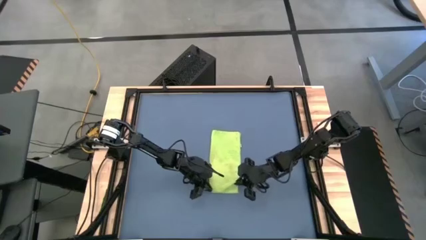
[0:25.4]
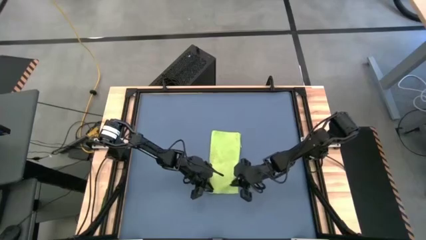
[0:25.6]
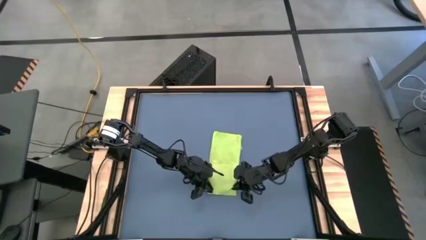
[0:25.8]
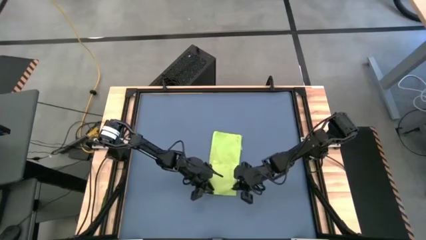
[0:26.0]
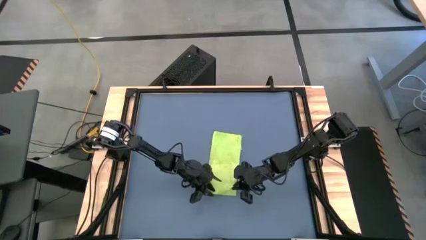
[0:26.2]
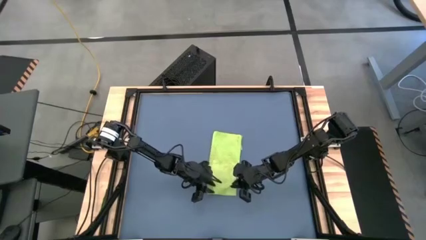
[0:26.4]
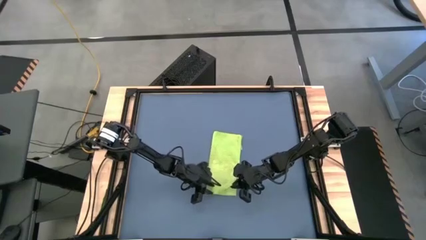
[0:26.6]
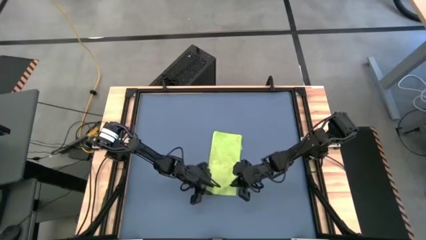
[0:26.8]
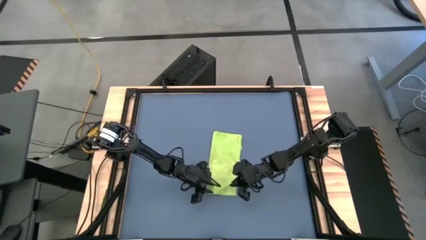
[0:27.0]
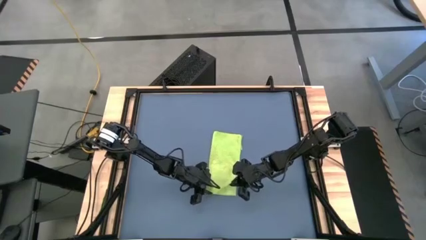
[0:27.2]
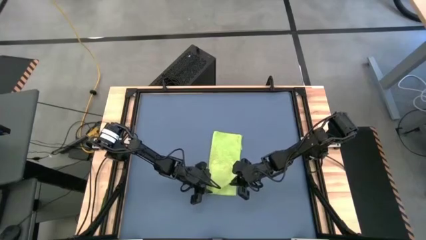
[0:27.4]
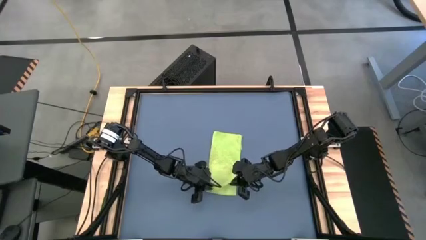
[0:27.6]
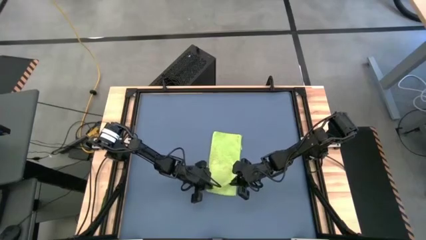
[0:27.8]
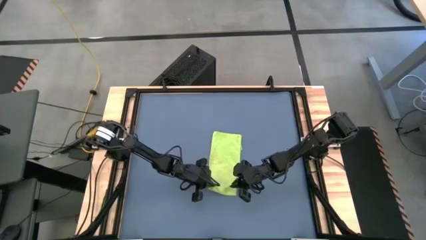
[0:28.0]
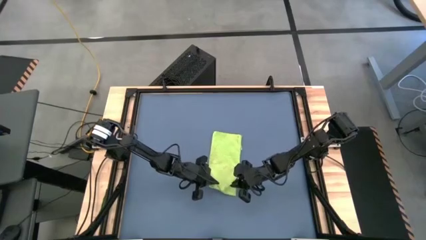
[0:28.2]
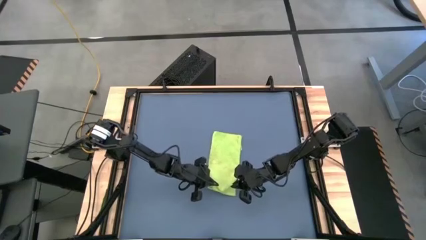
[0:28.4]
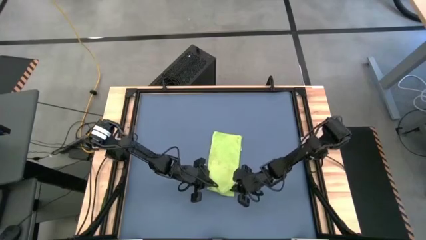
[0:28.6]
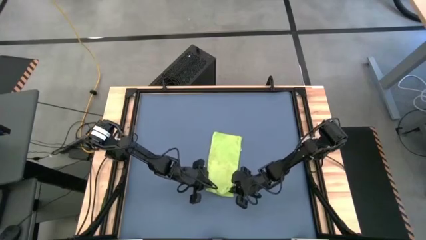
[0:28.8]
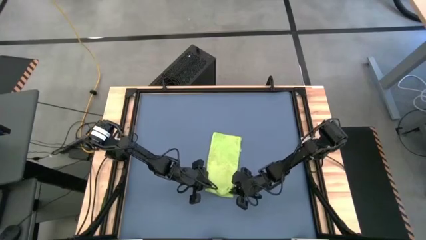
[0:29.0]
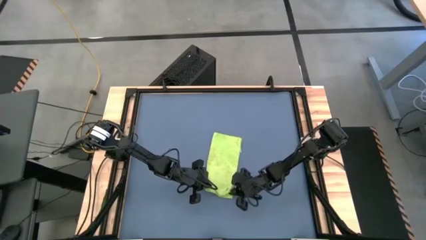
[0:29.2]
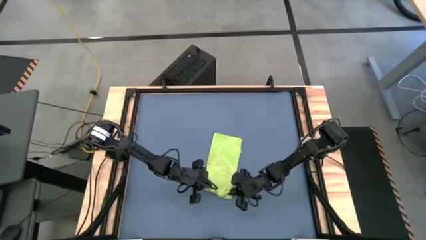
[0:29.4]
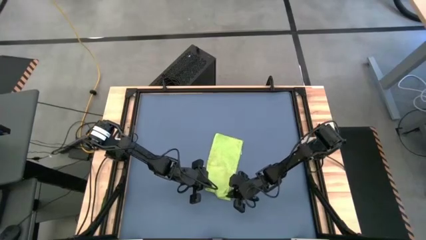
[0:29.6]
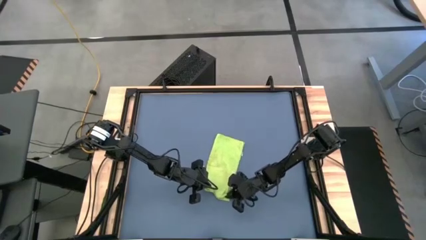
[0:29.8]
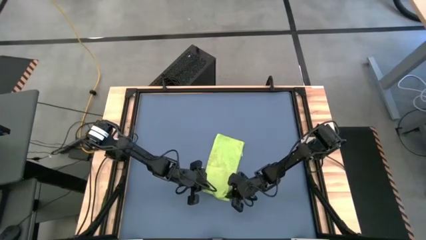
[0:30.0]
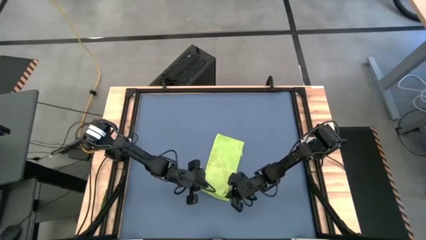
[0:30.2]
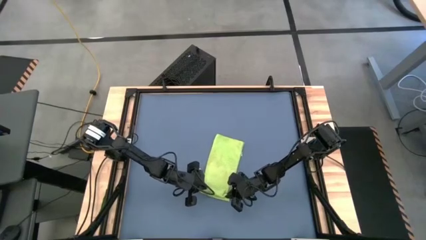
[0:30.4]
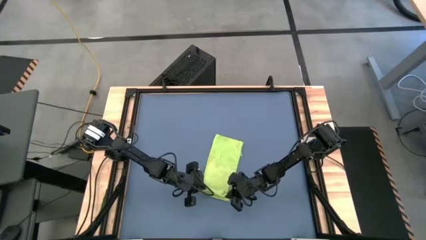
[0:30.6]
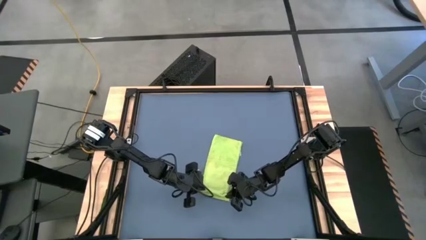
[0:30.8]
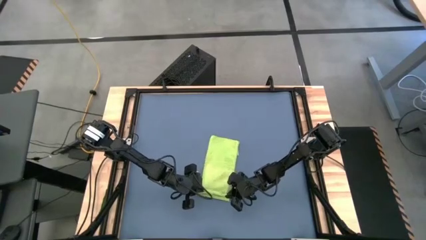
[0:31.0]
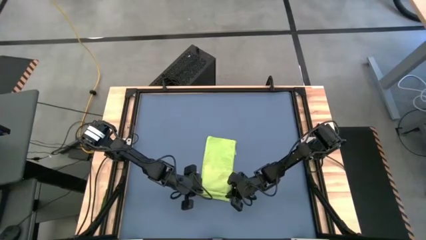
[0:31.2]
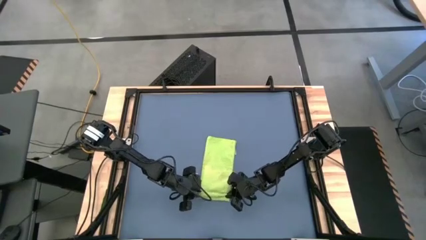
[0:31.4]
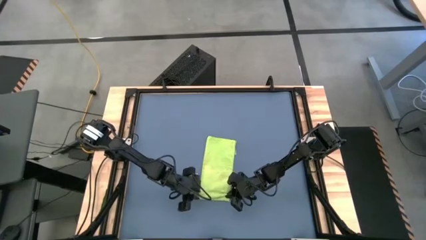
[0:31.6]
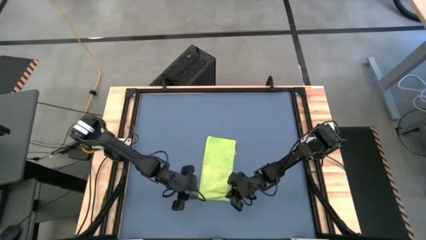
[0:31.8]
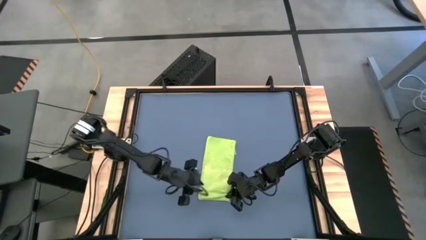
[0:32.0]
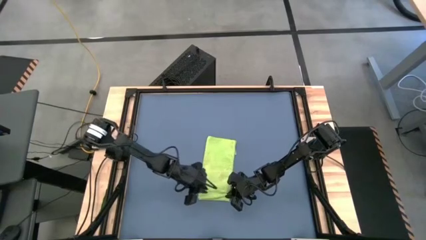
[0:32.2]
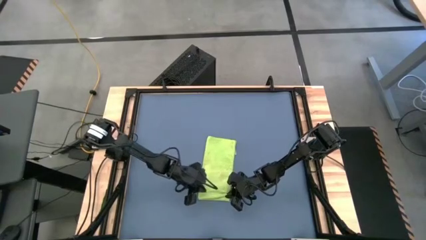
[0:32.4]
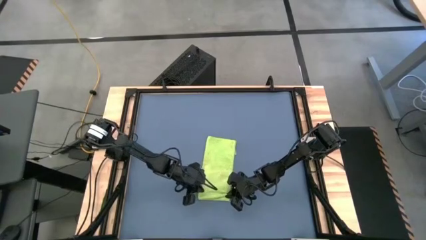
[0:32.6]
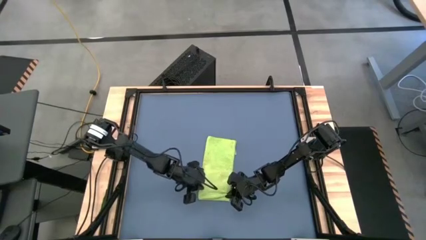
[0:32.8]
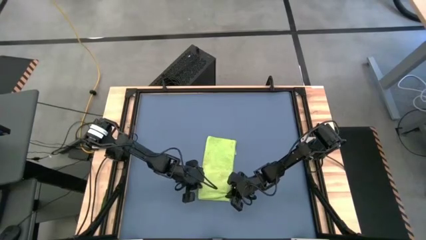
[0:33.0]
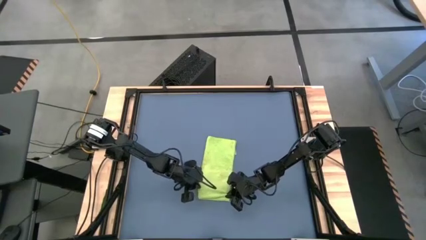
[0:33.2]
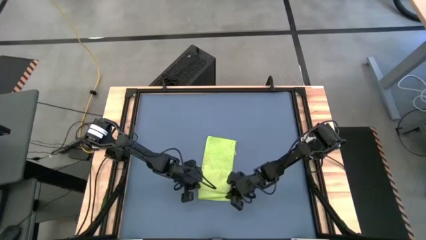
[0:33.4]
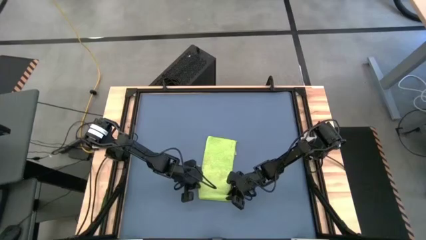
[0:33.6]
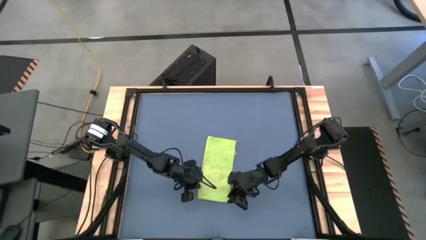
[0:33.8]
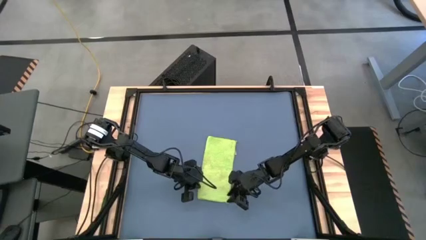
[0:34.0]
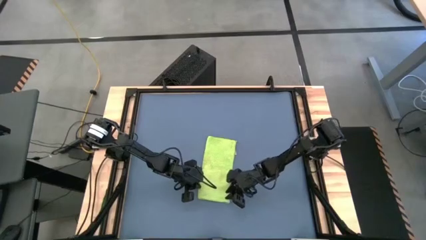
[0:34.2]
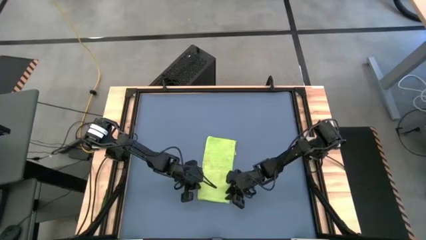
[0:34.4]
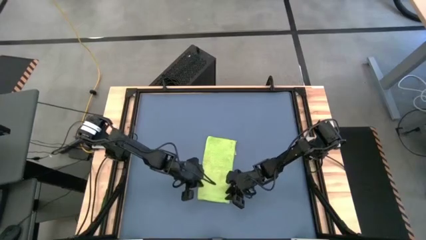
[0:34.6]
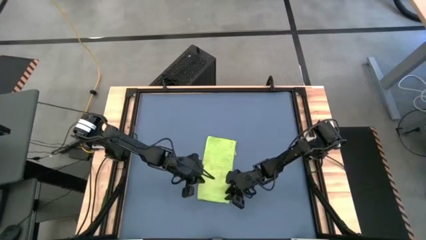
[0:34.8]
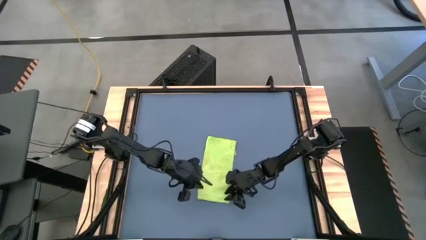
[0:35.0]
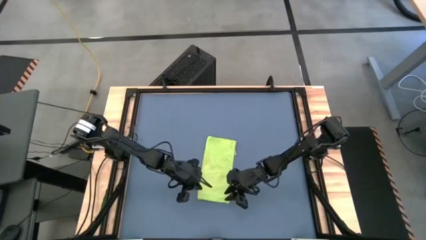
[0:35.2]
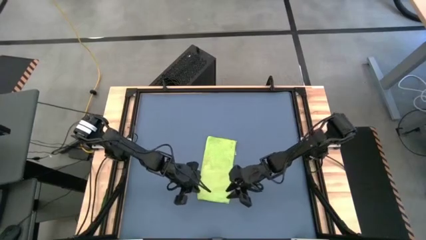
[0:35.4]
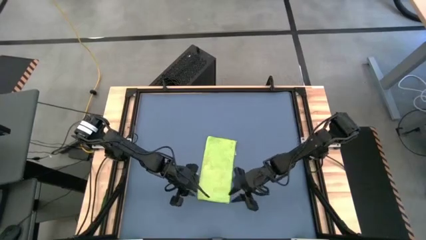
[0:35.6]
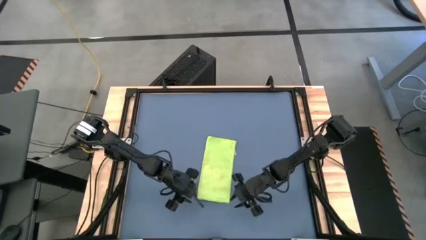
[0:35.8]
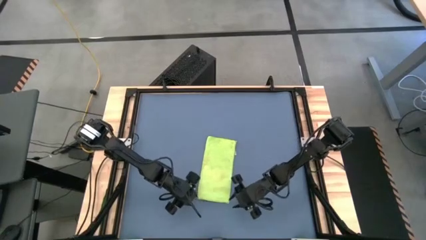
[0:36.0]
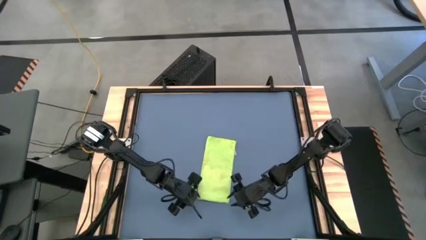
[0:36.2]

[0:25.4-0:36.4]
Task: Roll towel
Roll the green towel

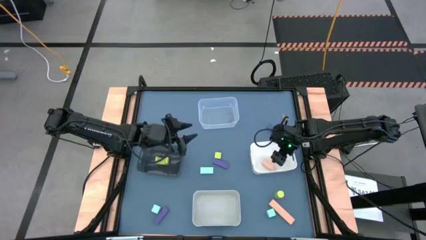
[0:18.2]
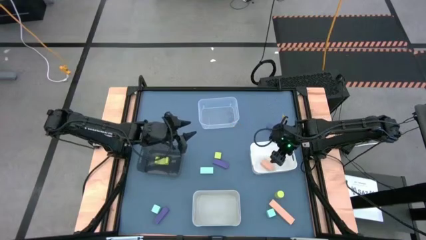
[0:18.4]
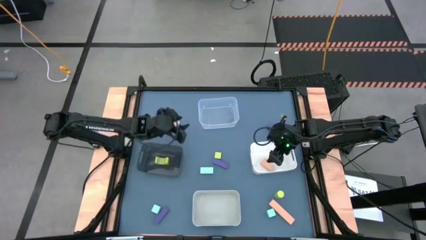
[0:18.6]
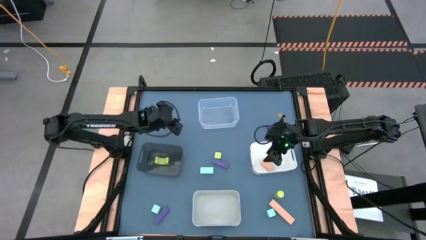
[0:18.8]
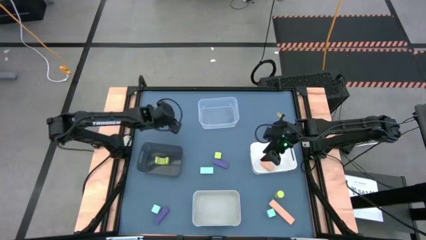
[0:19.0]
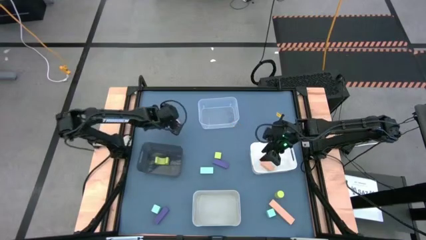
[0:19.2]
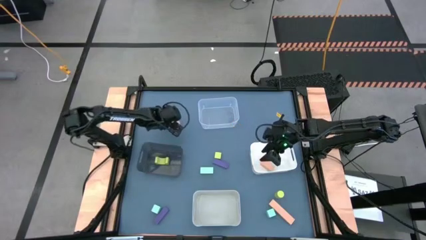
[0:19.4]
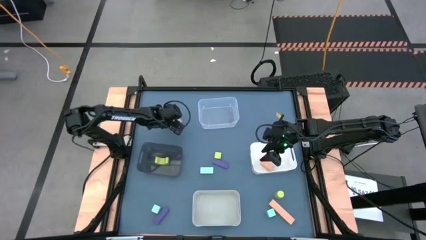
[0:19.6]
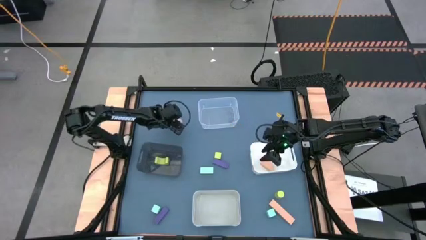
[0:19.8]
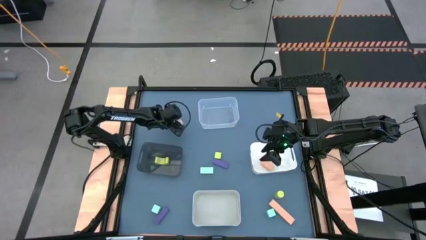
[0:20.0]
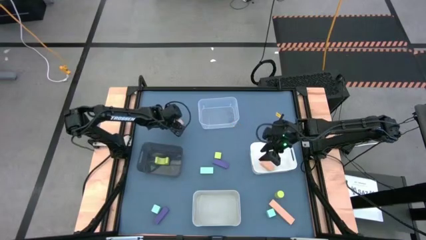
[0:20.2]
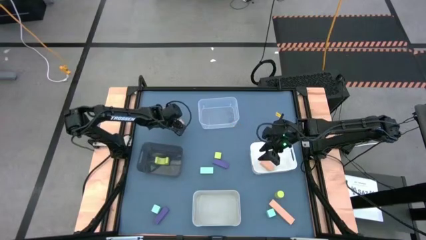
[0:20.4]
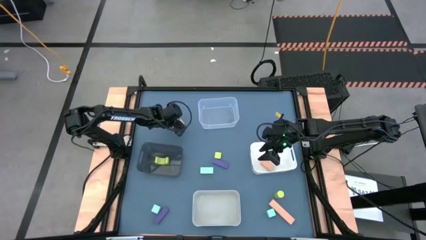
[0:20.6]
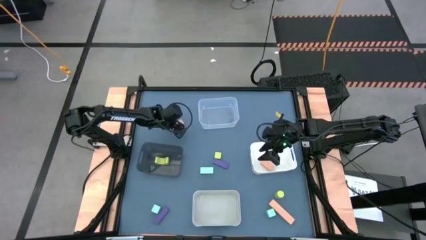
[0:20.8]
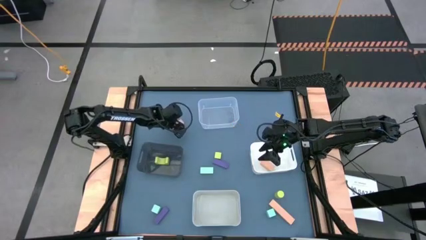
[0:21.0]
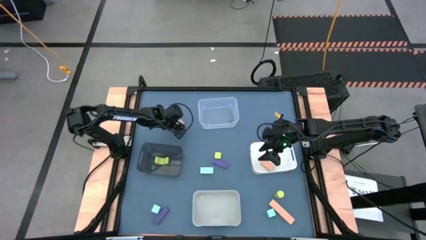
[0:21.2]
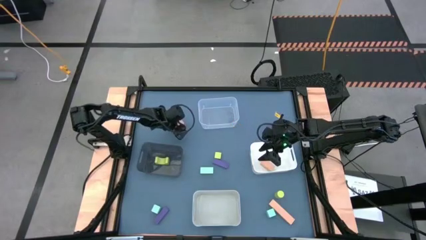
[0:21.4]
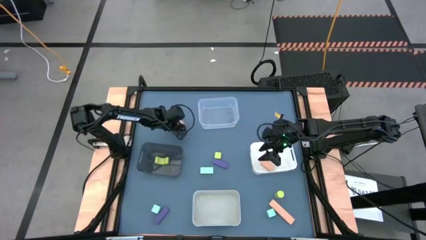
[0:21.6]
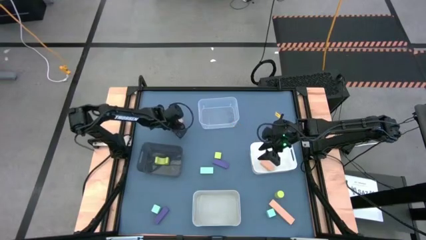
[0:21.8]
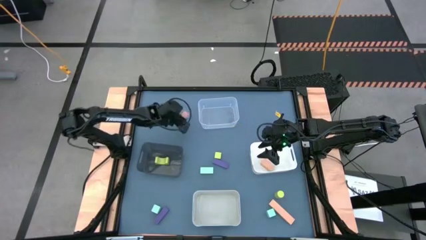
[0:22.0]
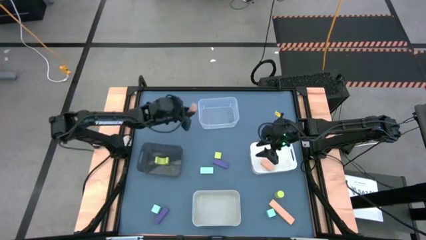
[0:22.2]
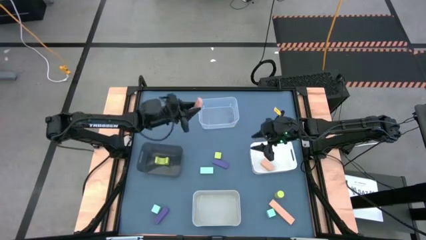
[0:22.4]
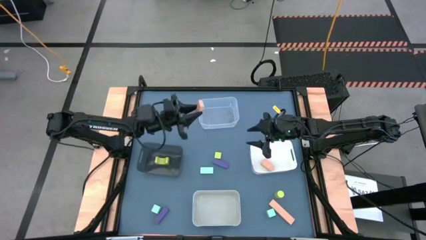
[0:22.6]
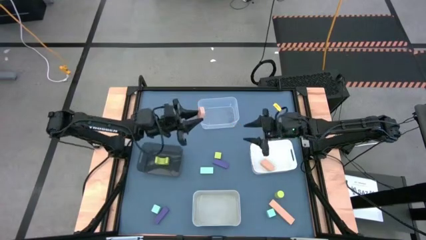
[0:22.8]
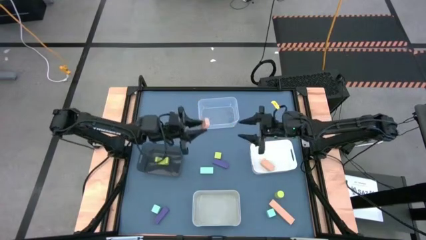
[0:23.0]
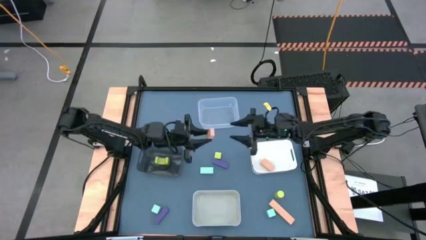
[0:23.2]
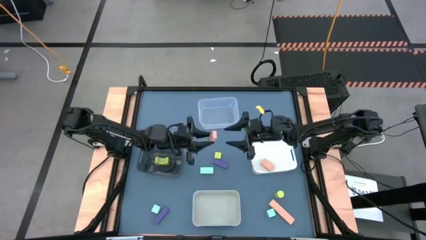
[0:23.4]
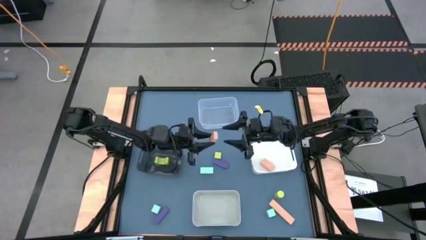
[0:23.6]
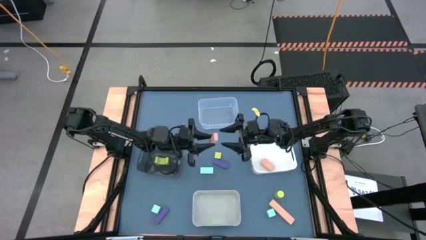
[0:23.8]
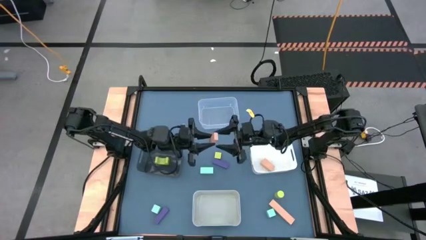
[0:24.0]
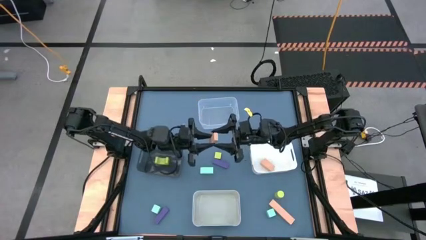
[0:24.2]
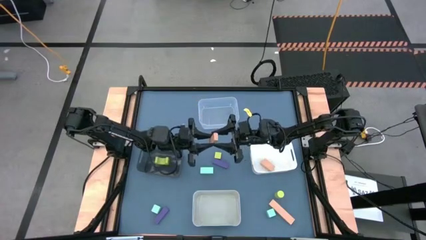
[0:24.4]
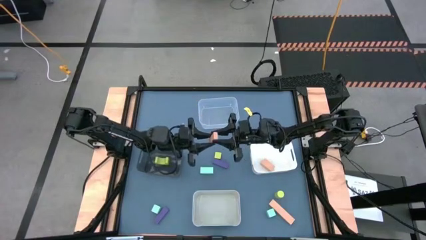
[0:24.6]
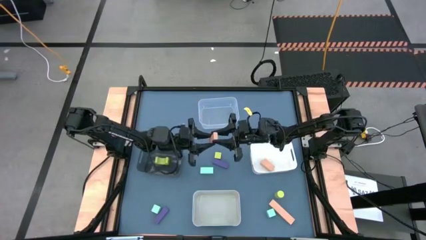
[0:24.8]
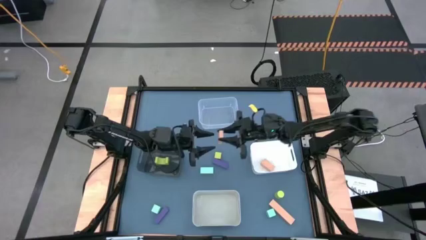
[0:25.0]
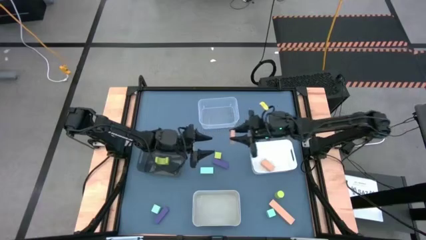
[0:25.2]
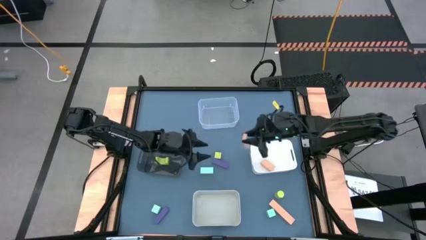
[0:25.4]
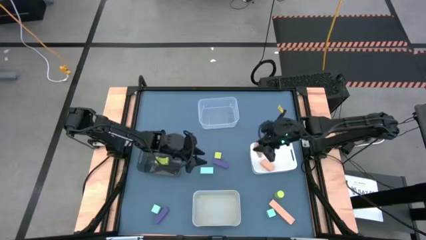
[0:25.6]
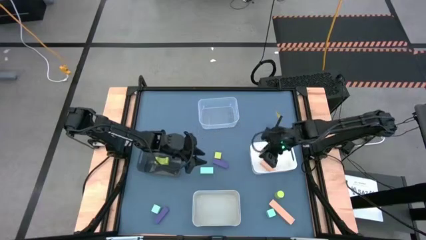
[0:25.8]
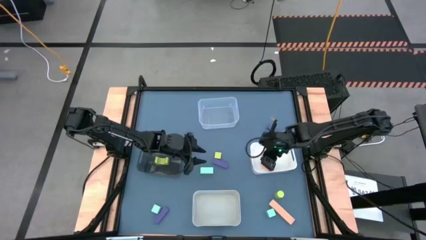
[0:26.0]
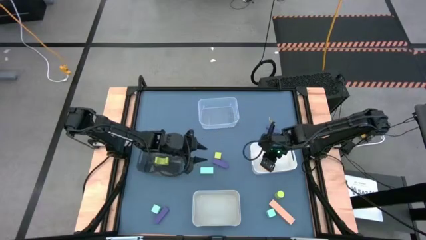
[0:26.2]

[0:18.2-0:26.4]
Task: Sort & place blocks by color
Put the top brown block into the white bin
